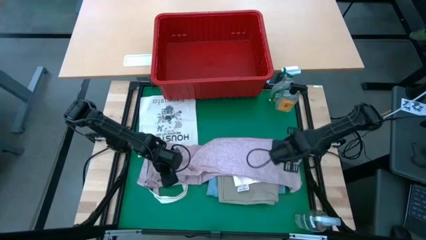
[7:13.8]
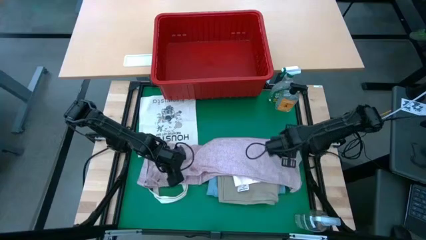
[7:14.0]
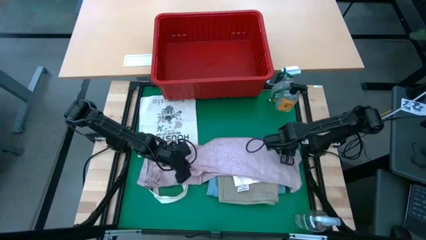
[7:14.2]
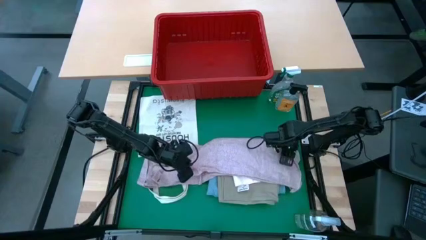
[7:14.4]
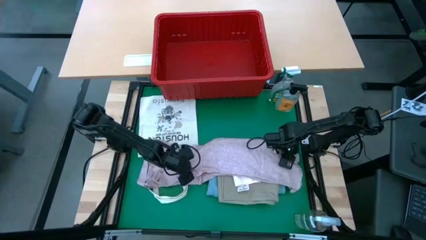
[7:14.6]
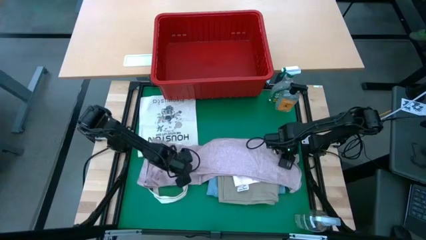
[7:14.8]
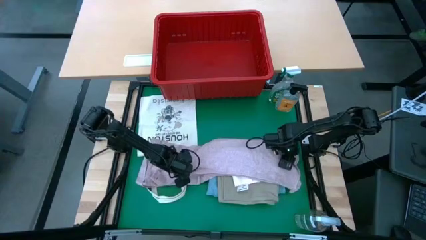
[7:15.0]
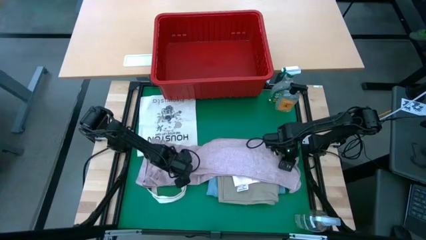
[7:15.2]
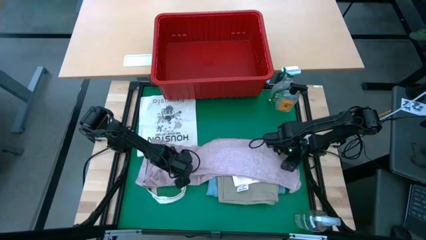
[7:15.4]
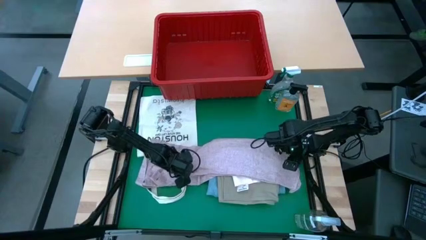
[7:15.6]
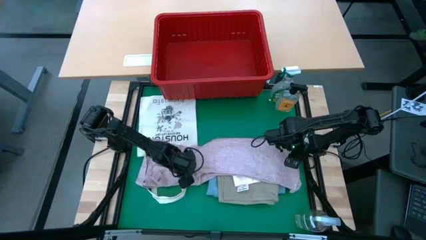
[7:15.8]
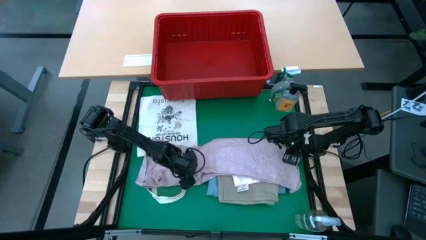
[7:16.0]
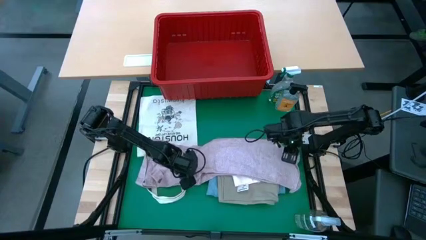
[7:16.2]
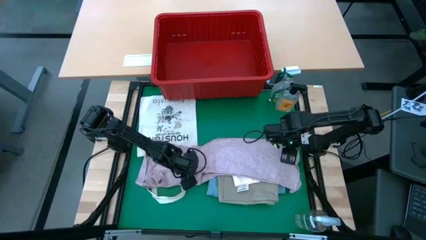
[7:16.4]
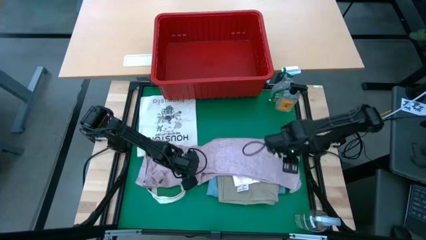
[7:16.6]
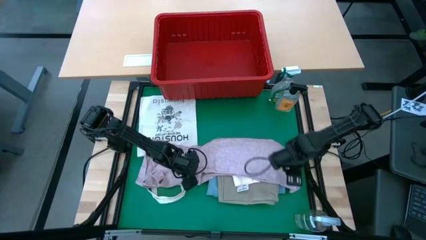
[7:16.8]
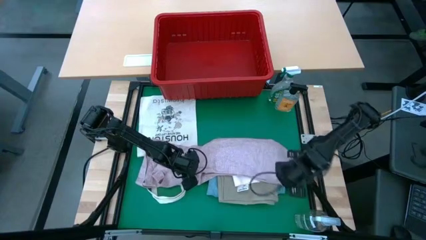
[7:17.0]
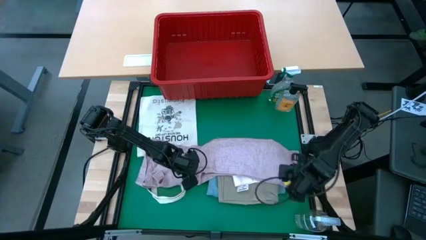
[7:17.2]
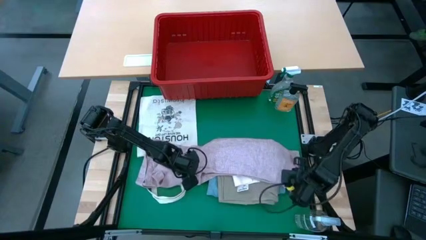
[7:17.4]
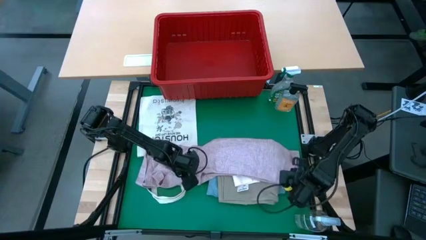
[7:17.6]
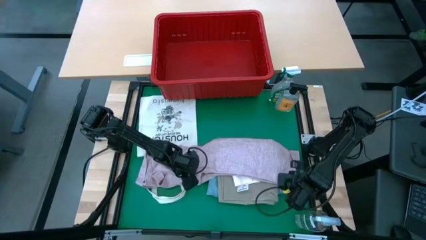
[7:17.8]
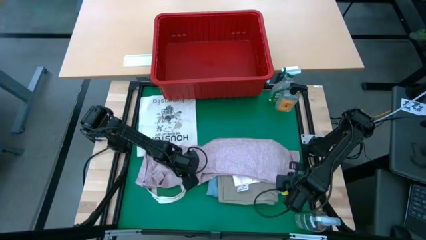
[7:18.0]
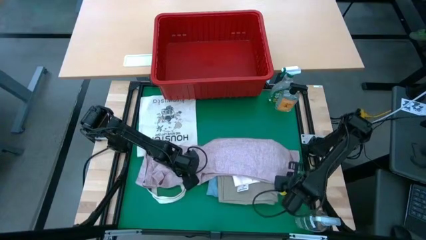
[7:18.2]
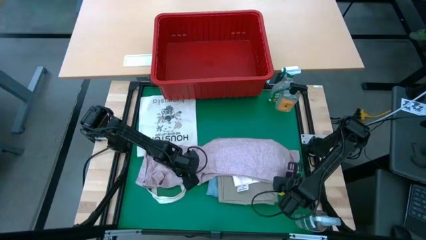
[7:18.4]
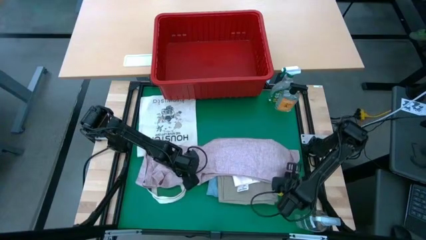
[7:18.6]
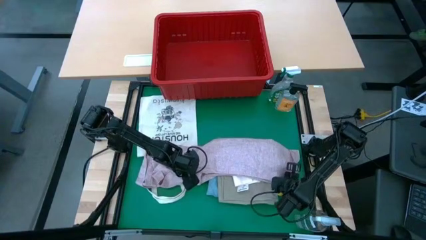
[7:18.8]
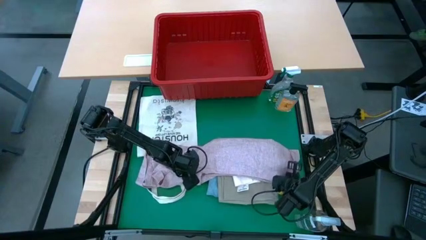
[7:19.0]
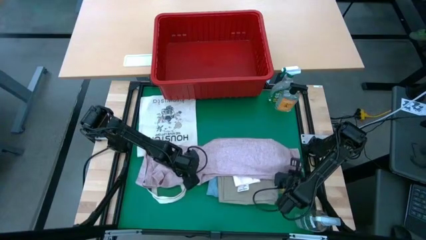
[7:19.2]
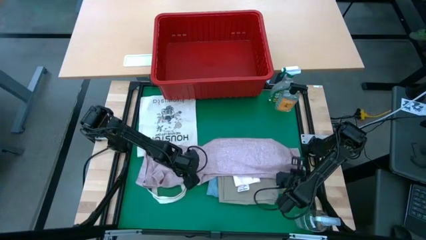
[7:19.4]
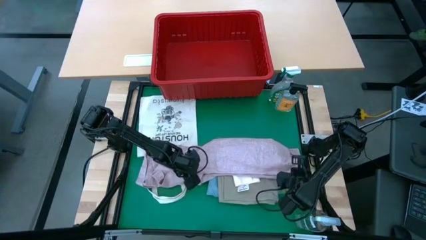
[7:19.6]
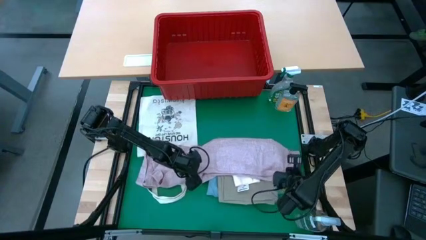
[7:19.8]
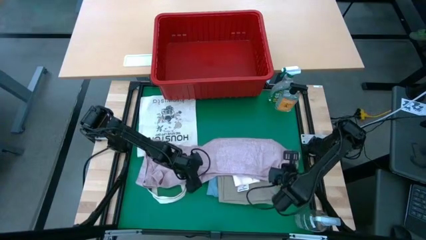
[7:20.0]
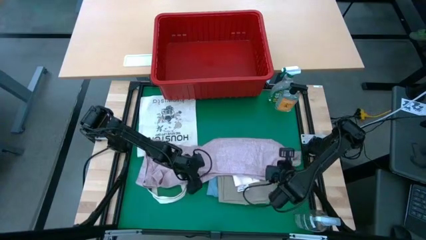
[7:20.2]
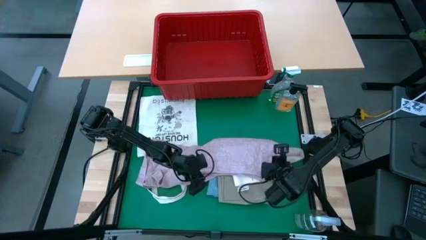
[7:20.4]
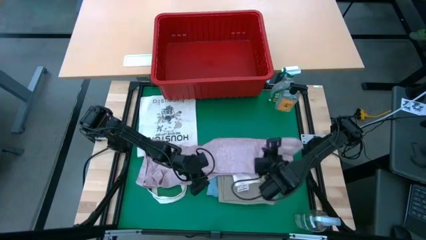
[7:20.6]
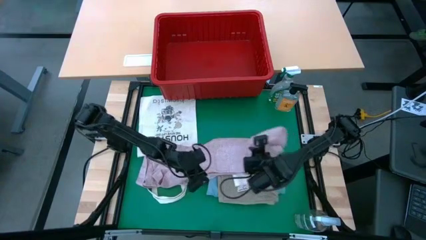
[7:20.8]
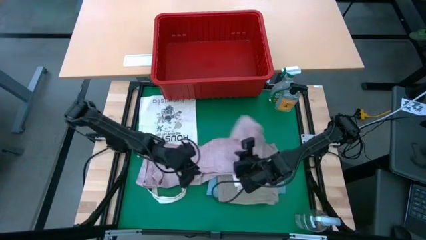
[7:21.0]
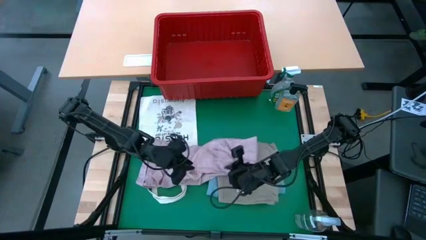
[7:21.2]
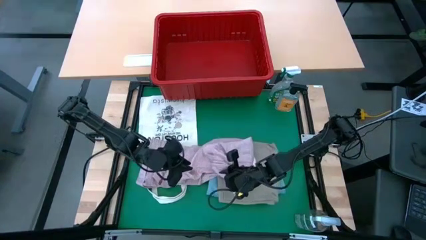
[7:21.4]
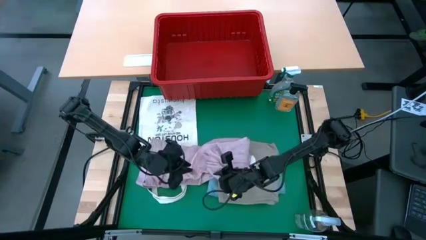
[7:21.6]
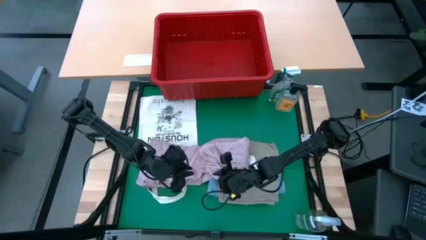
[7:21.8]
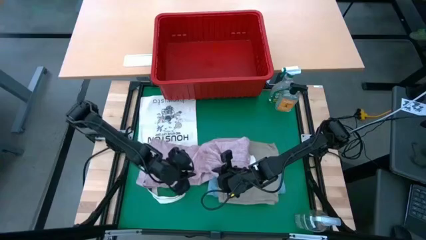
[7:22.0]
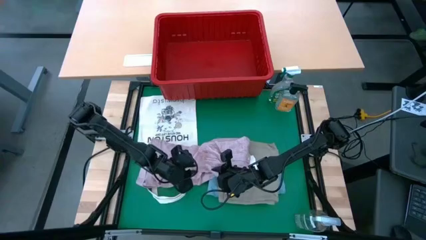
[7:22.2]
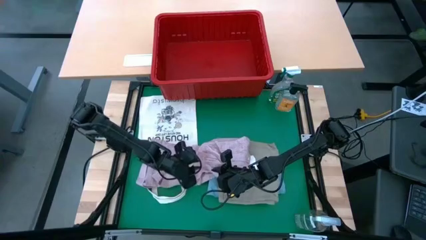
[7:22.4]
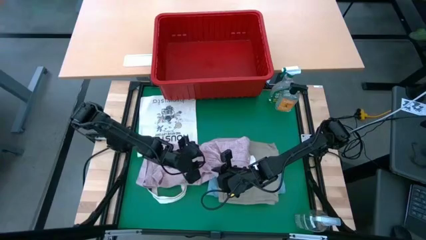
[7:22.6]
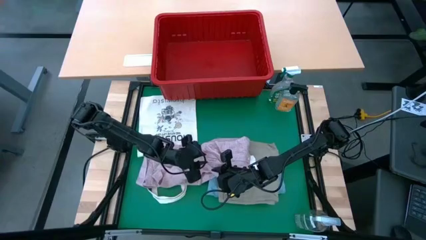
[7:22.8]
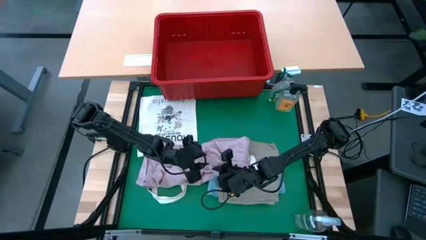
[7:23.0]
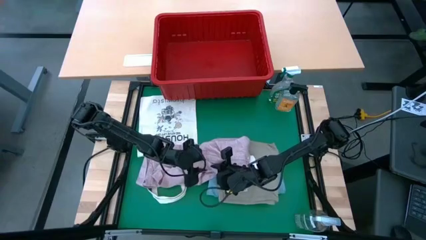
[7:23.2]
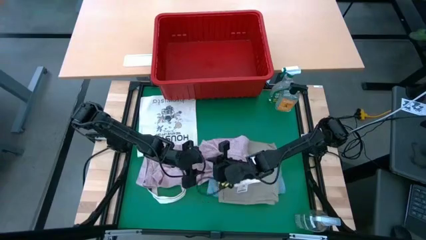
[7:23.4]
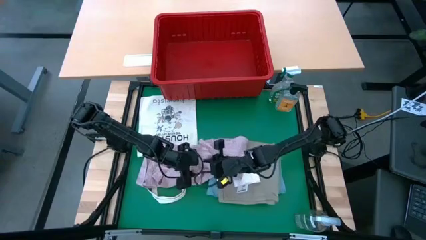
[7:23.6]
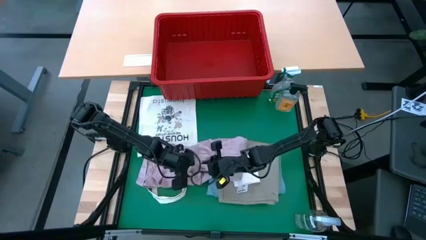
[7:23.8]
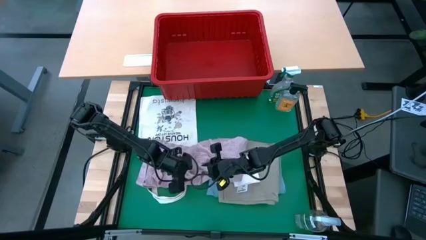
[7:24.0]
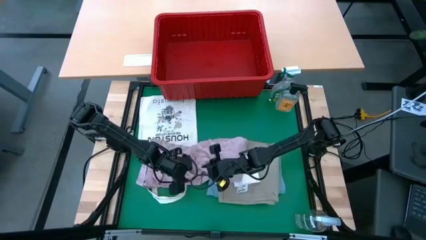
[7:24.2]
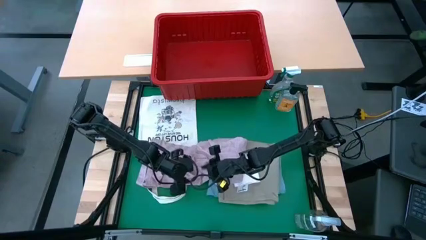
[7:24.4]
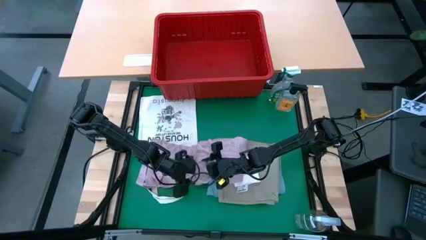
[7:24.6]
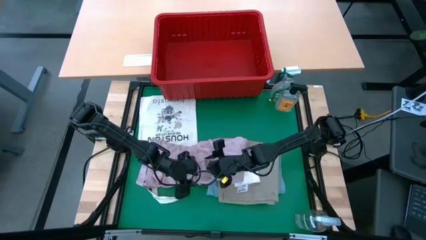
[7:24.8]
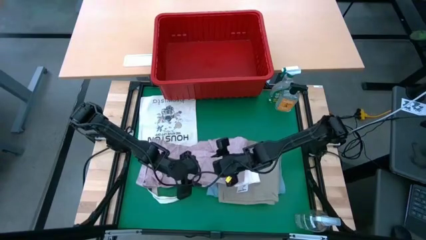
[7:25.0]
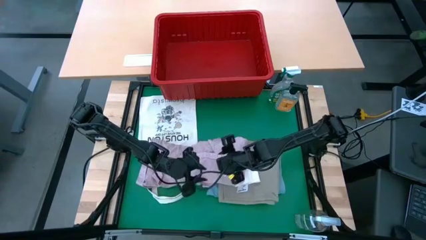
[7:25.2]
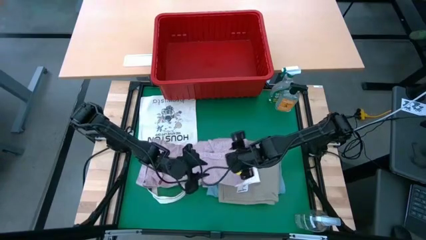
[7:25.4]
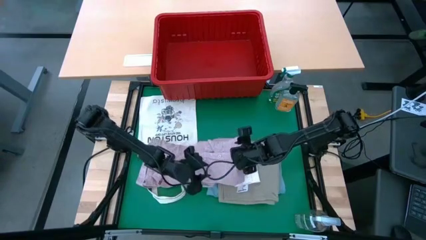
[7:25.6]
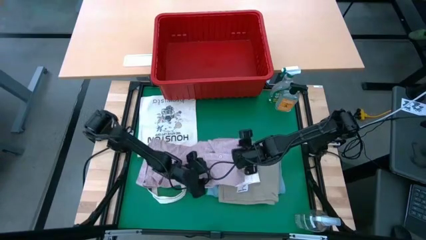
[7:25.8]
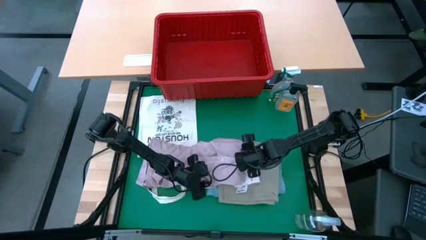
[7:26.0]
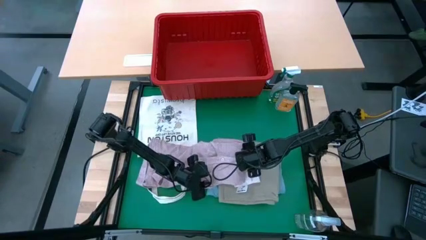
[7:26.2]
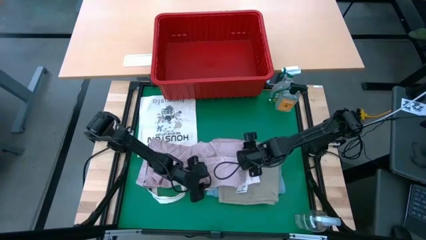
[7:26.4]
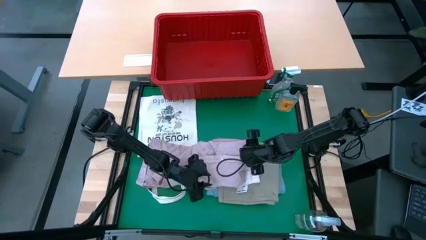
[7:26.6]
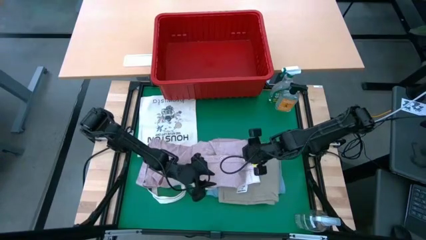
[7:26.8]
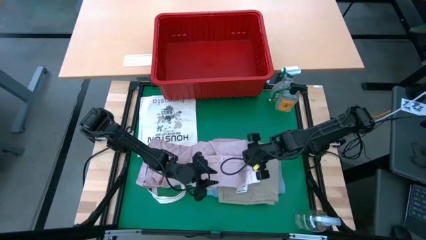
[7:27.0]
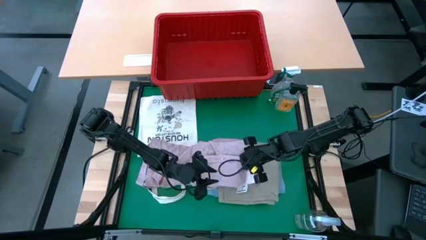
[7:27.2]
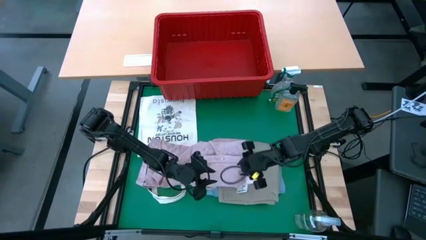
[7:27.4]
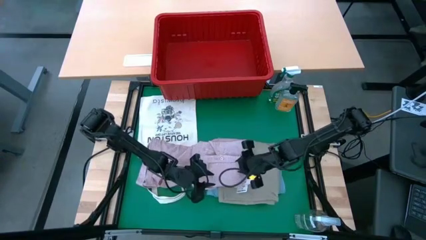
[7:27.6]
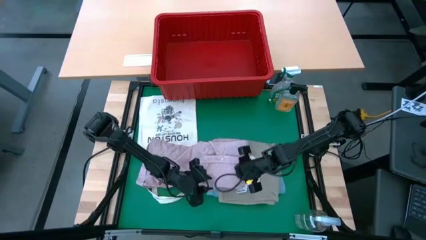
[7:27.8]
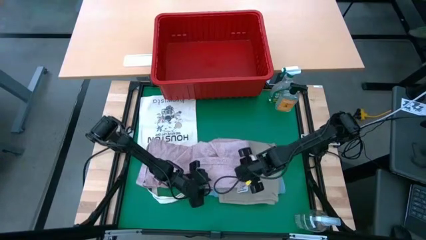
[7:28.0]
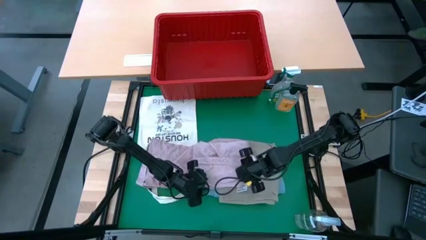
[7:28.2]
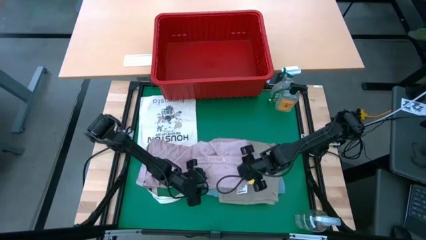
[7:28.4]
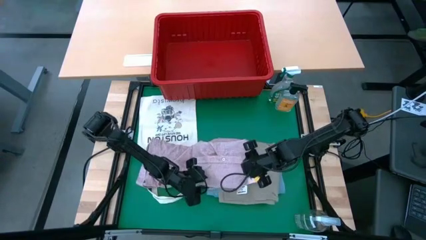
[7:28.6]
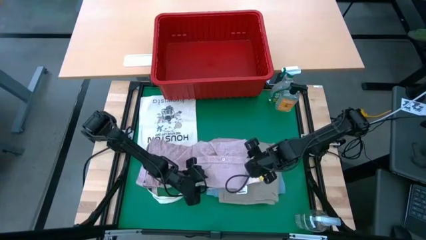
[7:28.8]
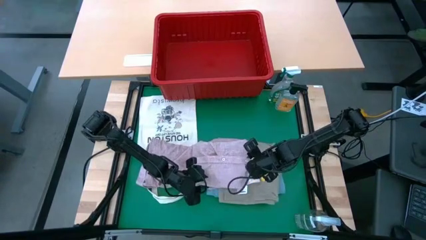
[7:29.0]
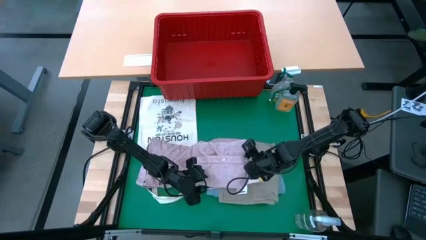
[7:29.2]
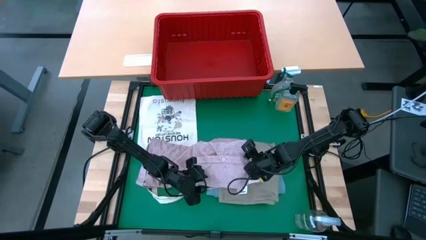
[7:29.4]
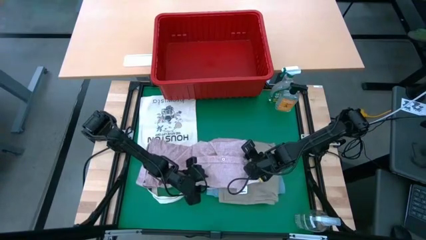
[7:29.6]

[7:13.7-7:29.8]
Task: Fold laundry
Fold the pink polo
